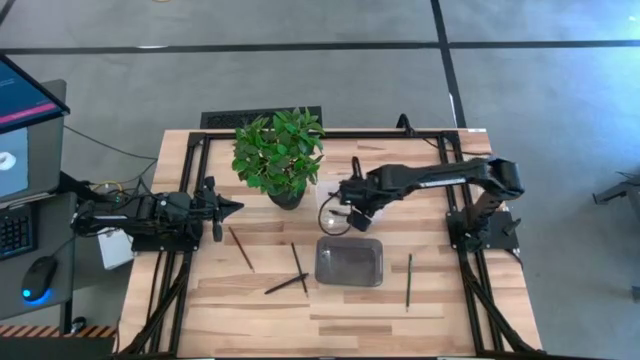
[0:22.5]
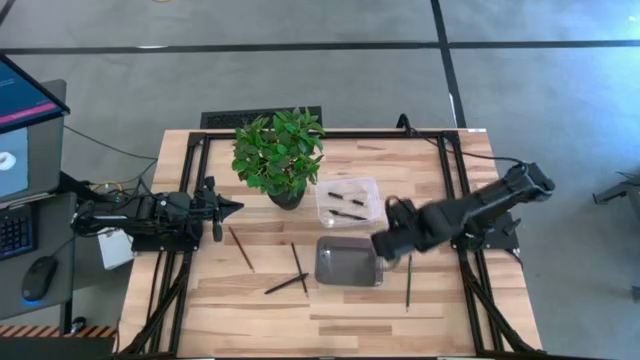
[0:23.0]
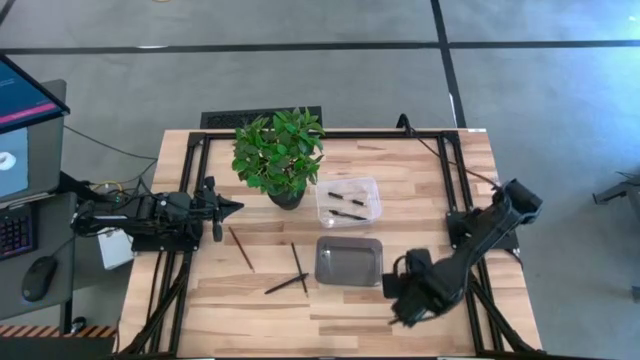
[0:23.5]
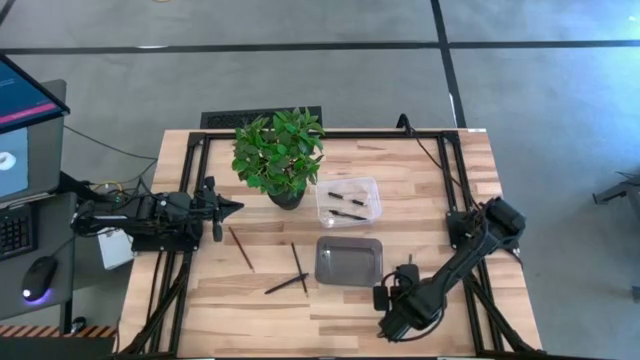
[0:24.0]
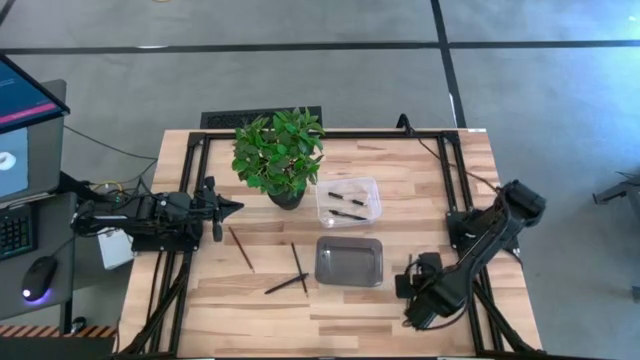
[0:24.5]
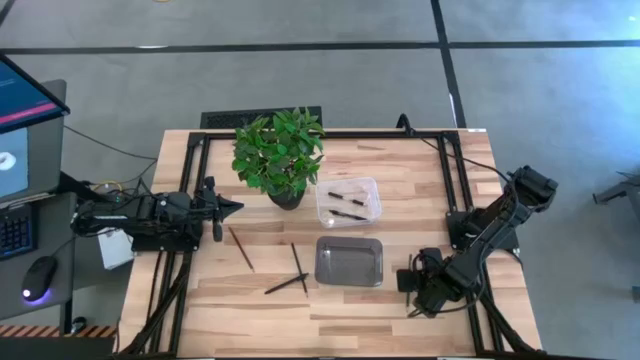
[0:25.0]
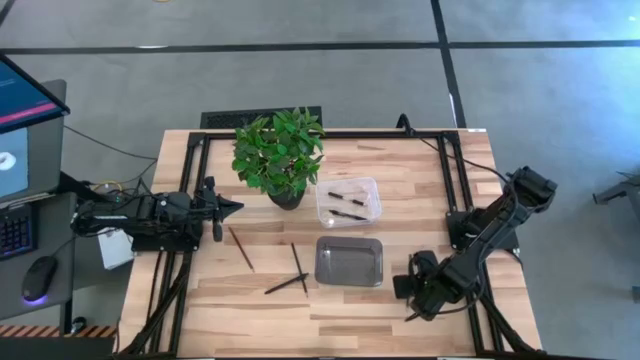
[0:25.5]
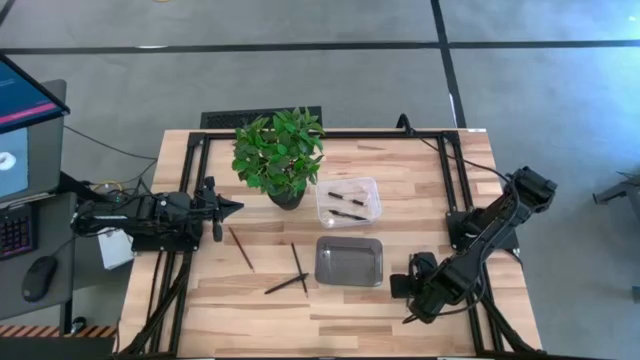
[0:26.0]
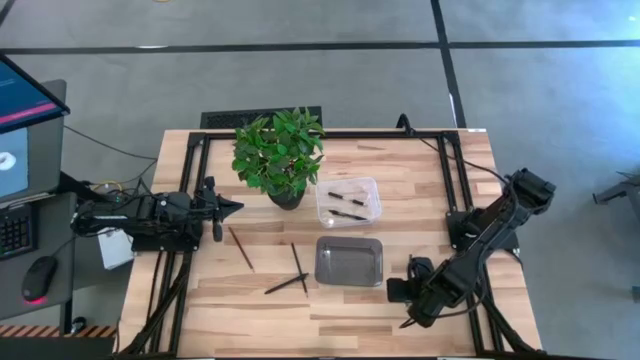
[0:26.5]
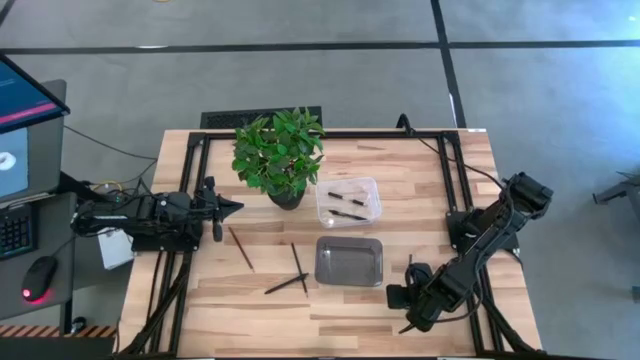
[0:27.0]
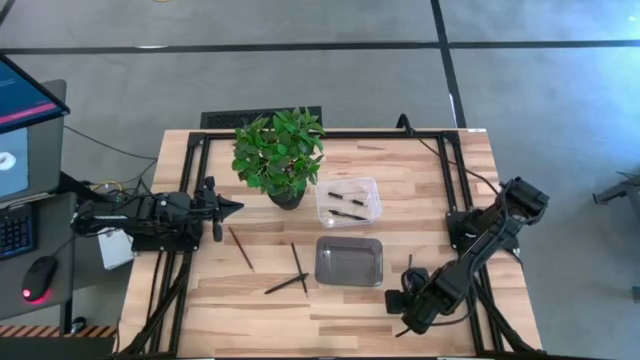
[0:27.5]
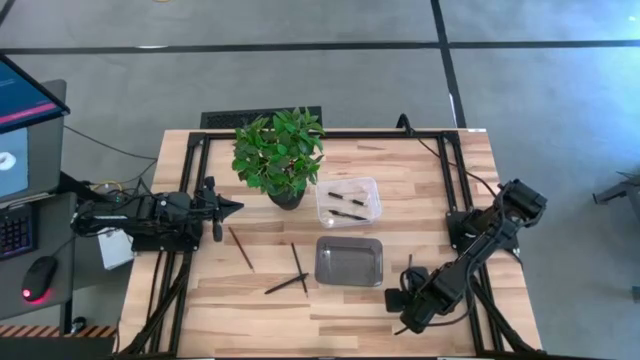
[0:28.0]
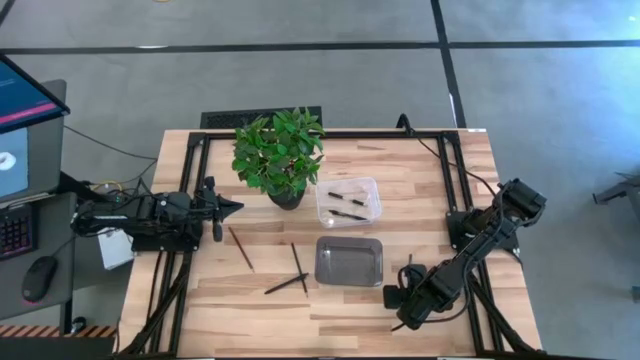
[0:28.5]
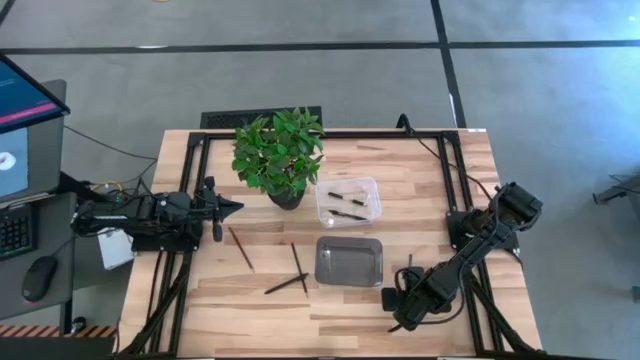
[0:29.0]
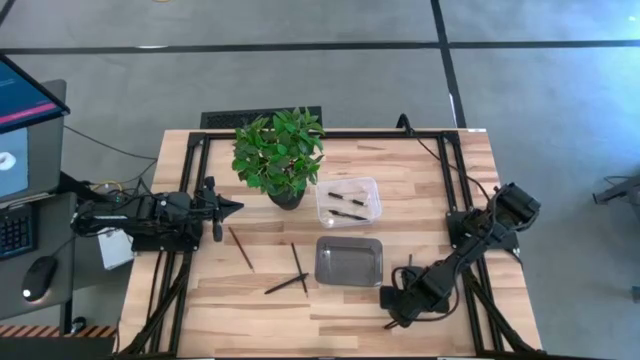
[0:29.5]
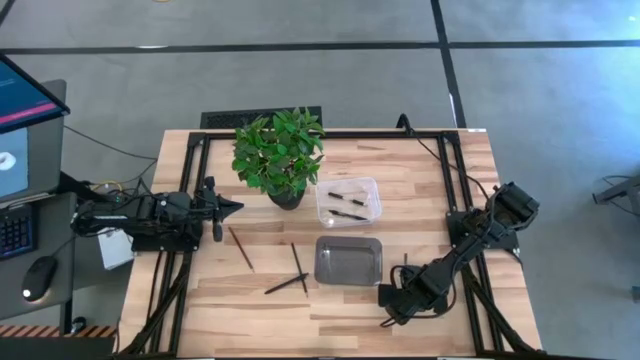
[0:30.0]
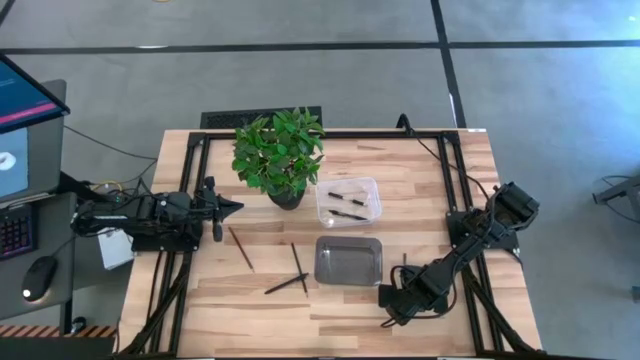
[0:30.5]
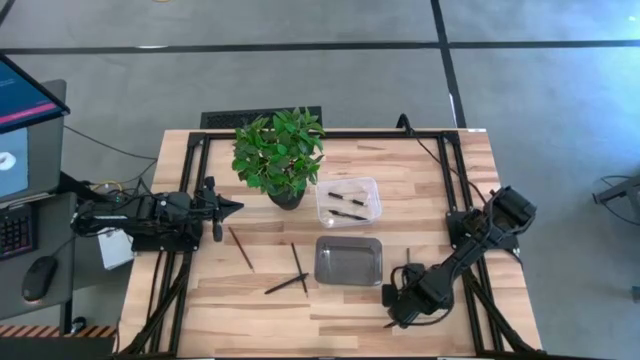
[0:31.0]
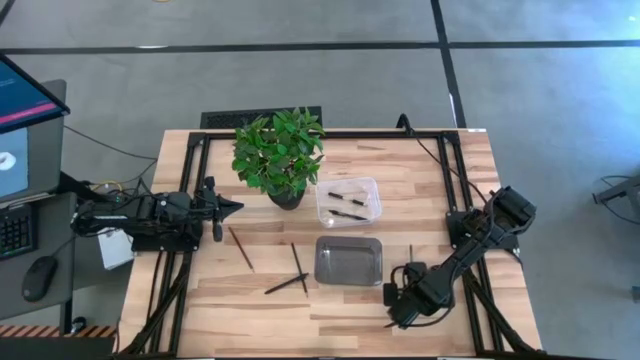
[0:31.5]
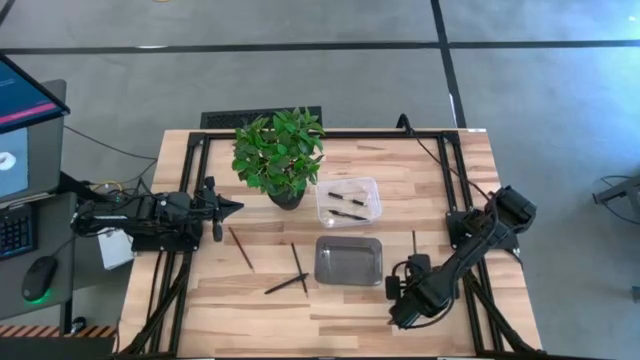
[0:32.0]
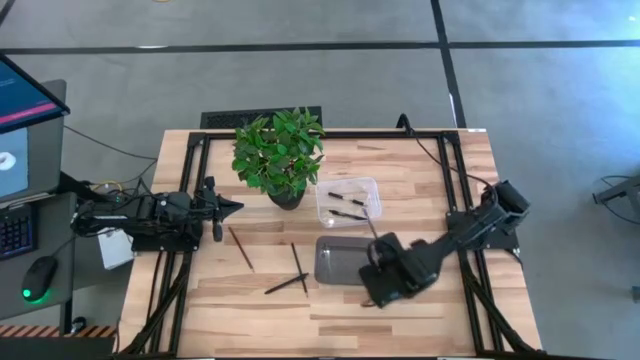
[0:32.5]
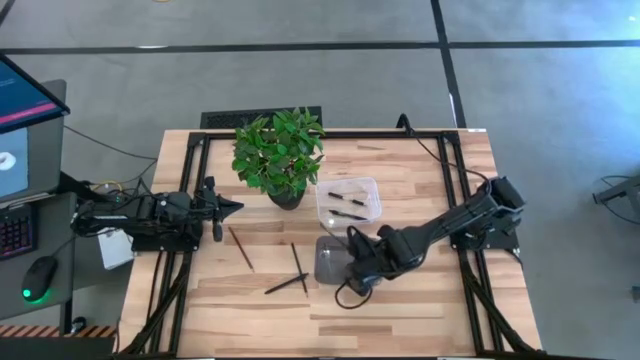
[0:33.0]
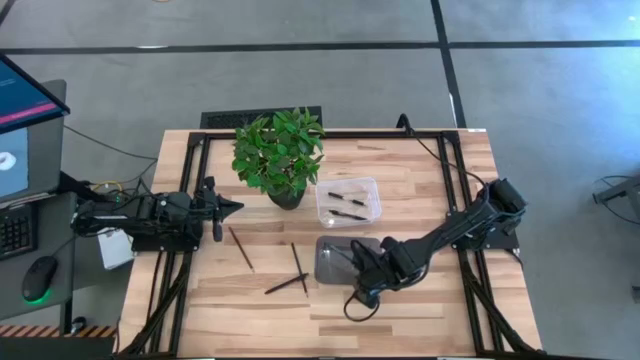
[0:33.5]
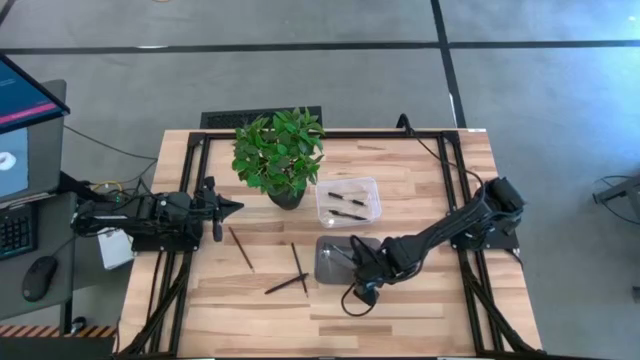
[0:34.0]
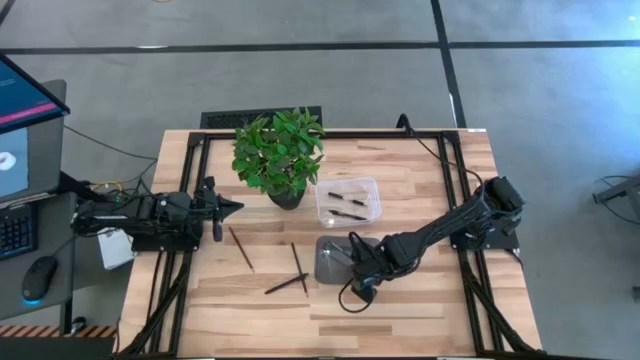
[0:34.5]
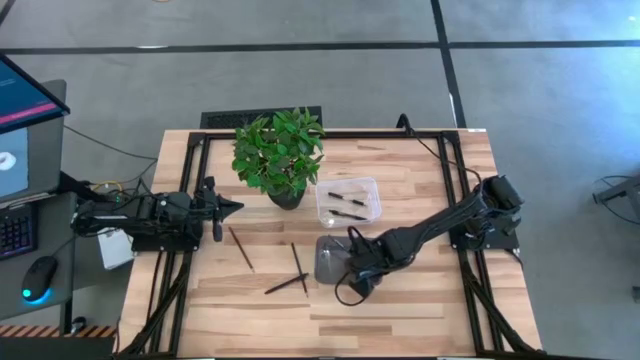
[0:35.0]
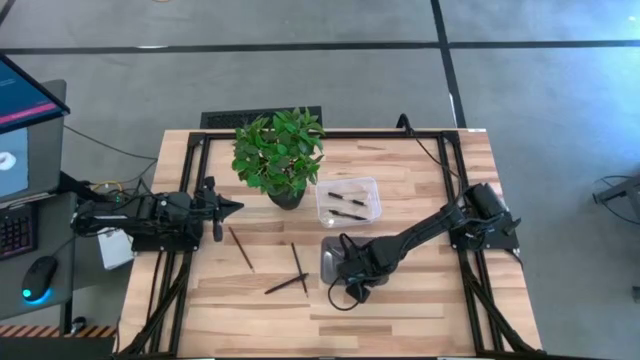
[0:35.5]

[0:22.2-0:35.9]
Task: Sort pens & pencils
Put the green pencil into the black bin

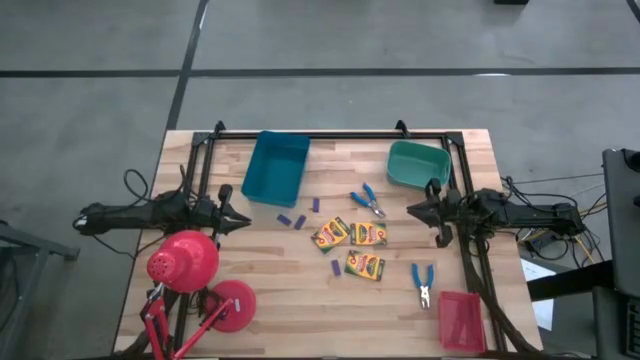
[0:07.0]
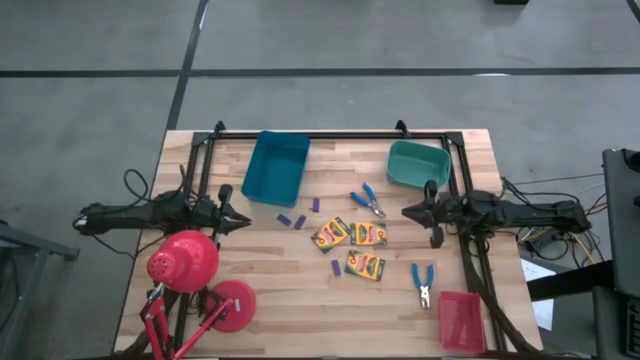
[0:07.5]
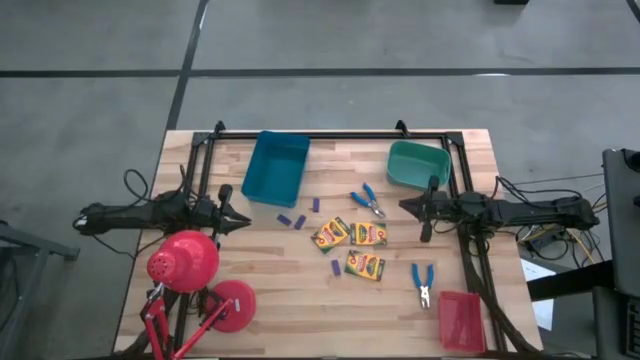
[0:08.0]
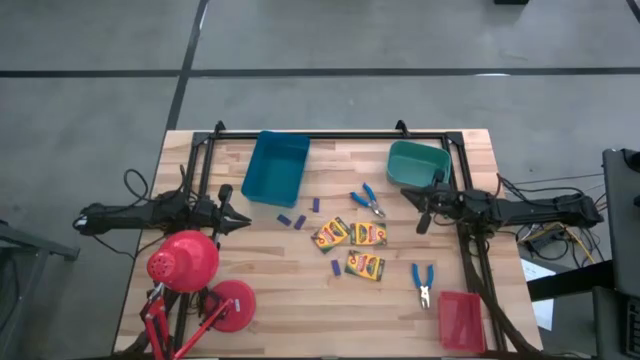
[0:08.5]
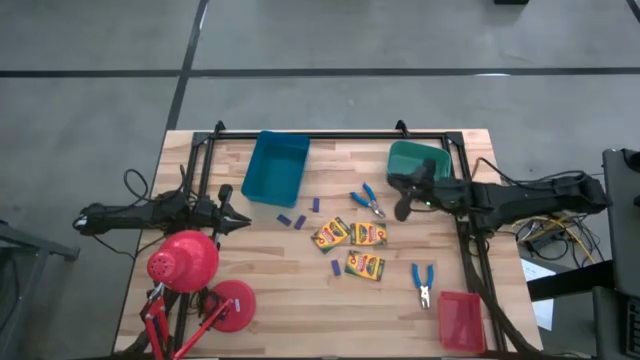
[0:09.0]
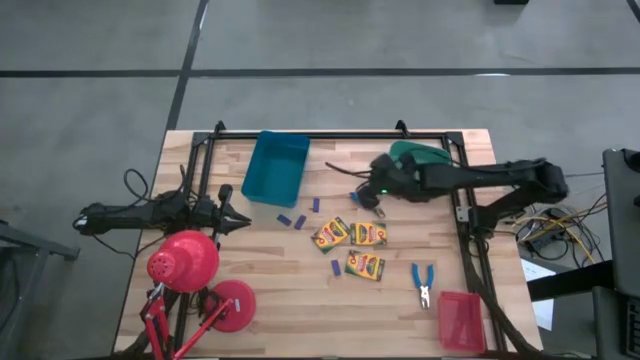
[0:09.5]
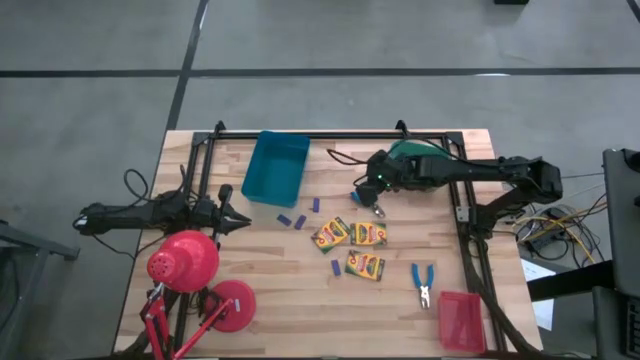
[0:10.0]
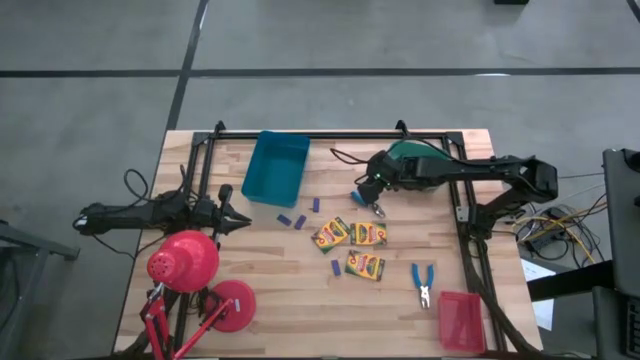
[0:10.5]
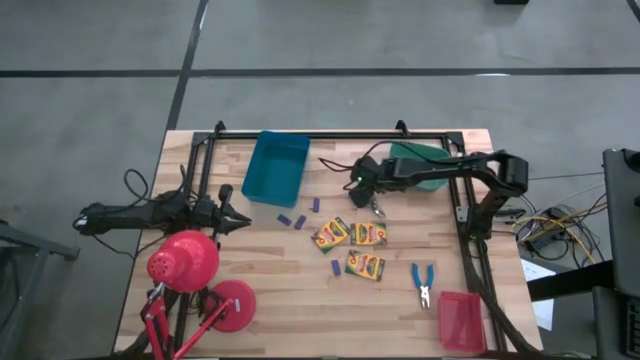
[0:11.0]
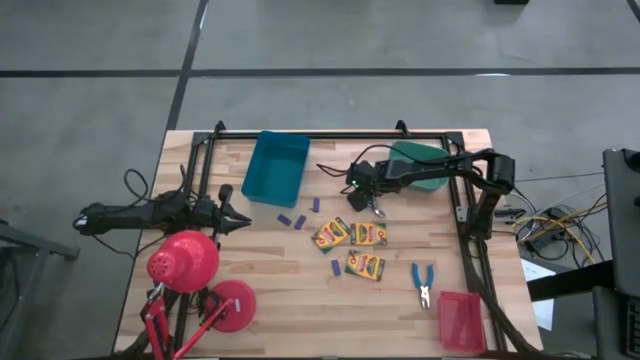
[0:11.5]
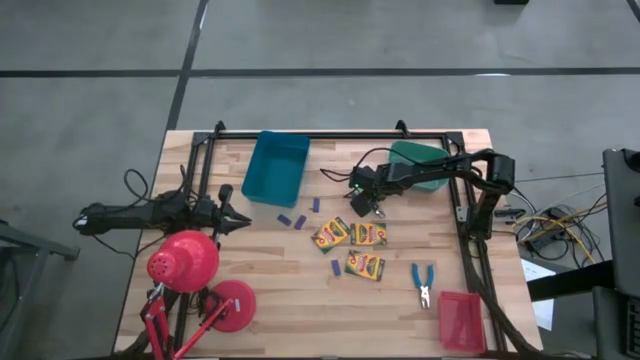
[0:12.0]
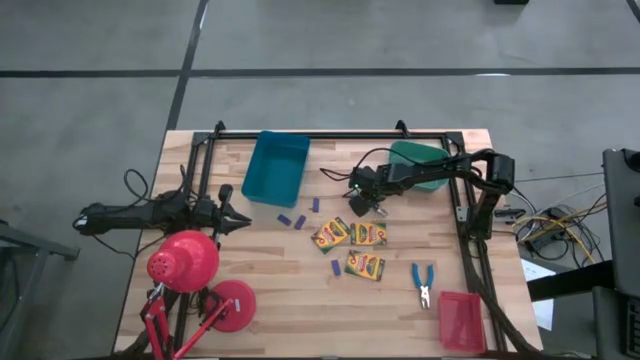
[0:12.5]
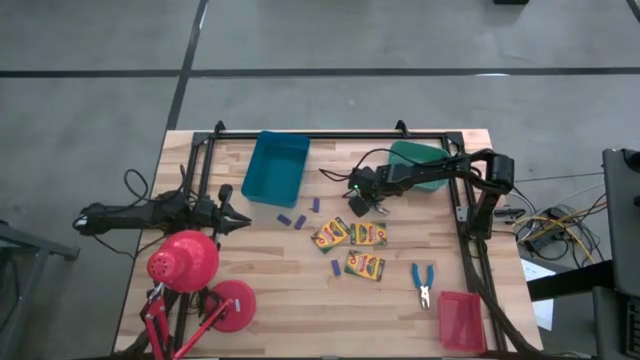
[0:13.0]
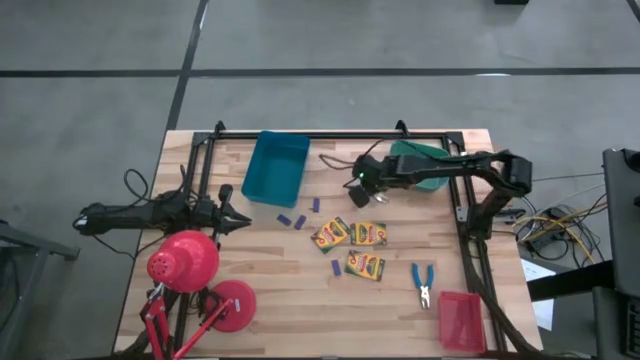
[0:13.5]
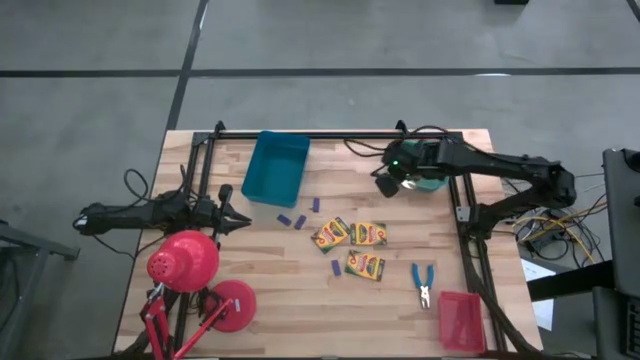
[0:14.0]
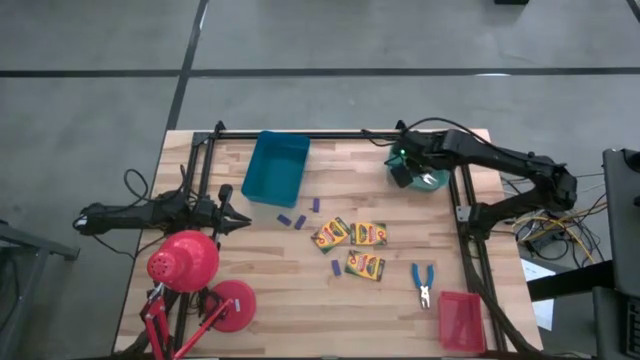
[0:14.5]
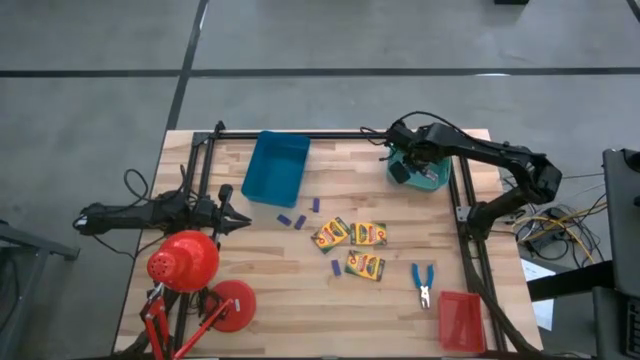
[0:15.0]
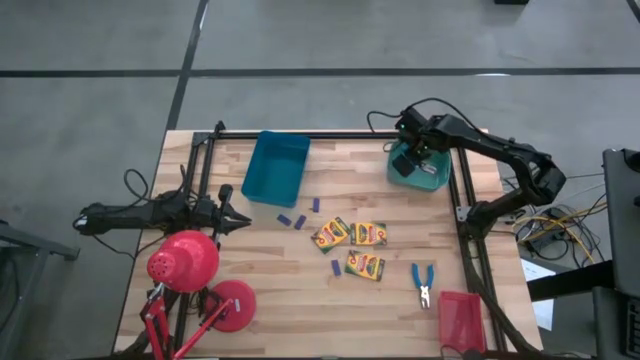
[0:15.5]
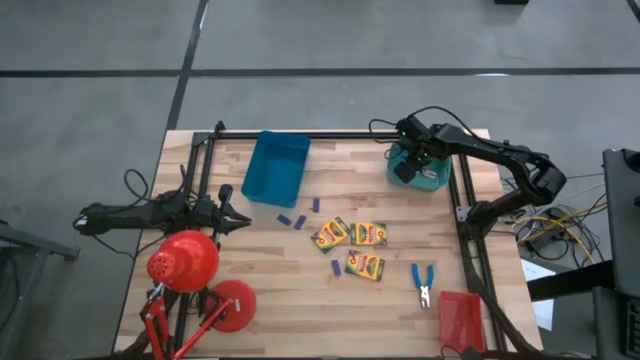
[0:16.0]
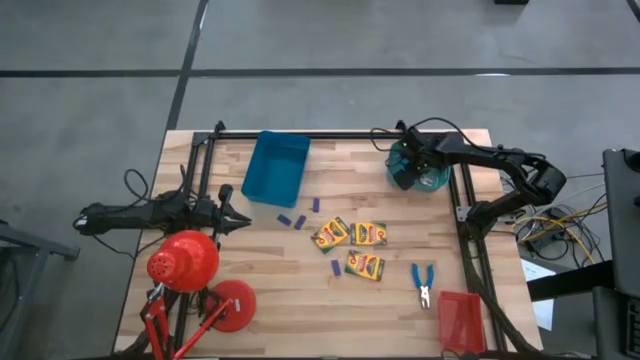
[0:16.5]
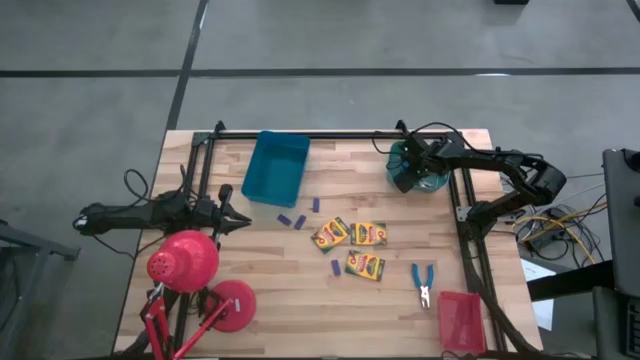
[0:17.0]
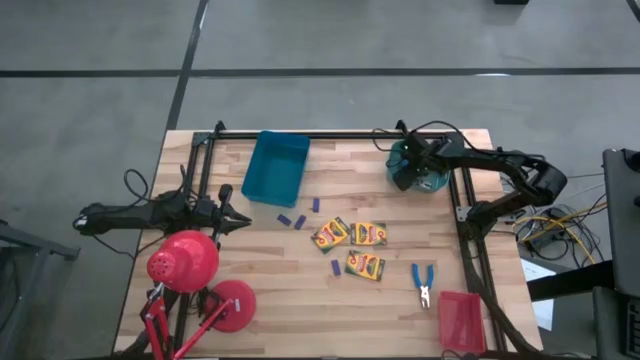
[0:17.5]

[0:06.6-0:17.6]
Task: Pick & Place School Supplies
Put the blue hole puncher into the green bin
